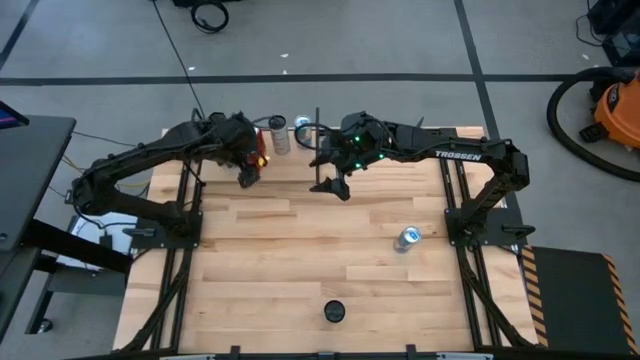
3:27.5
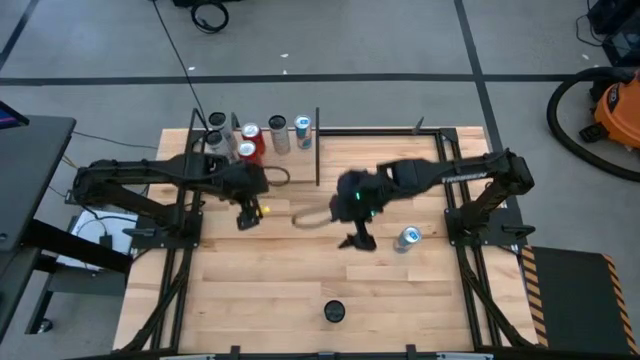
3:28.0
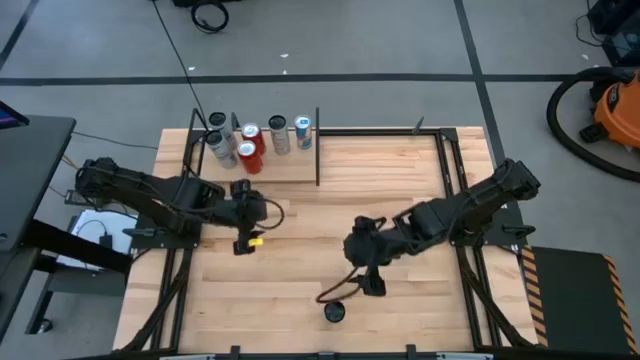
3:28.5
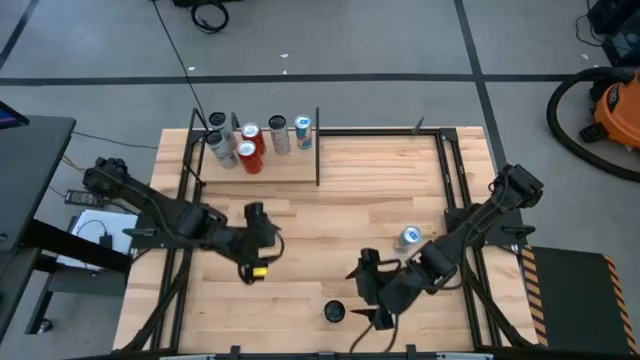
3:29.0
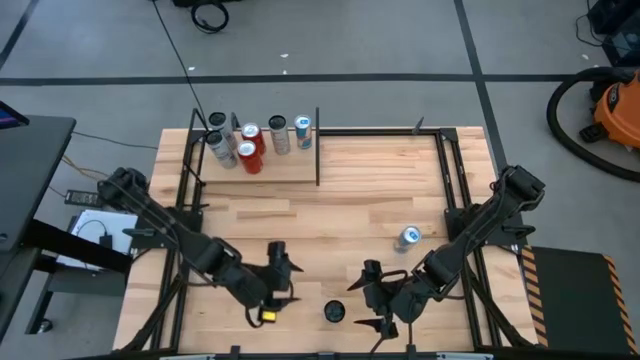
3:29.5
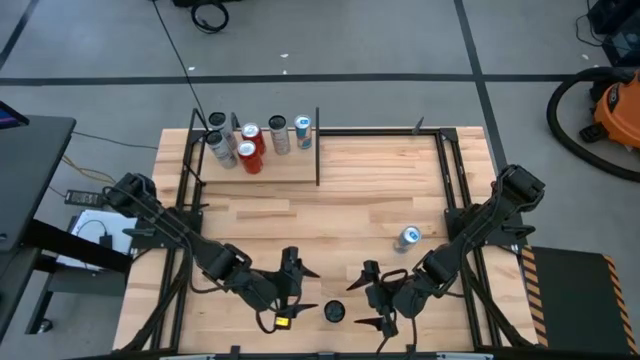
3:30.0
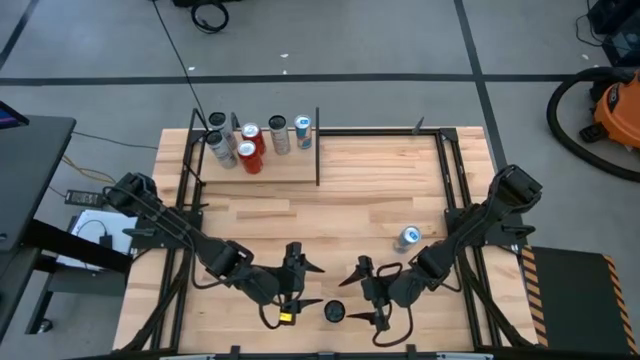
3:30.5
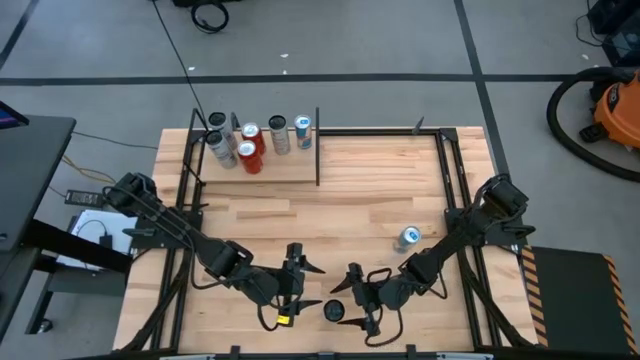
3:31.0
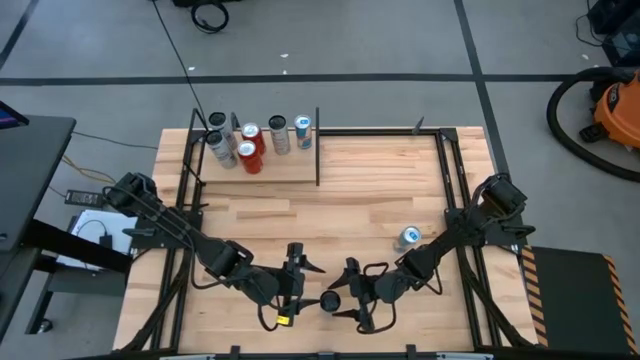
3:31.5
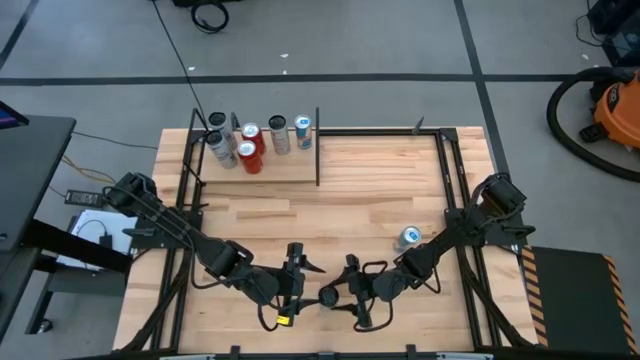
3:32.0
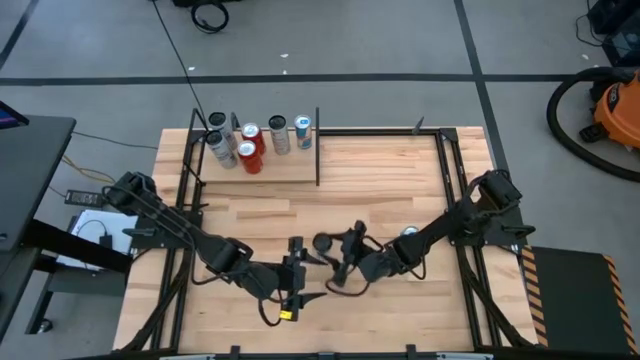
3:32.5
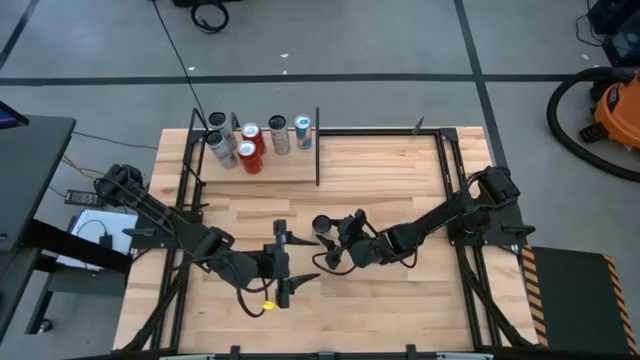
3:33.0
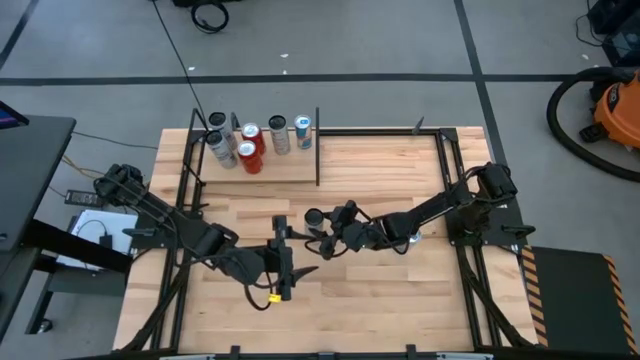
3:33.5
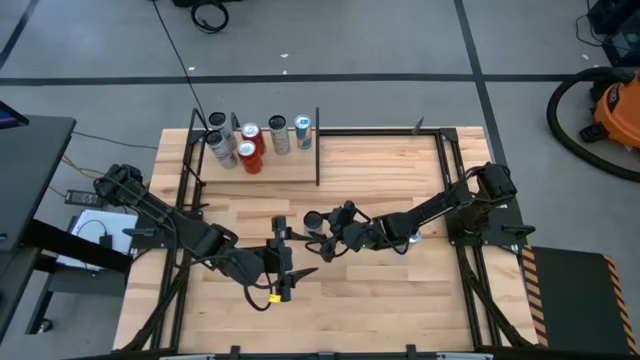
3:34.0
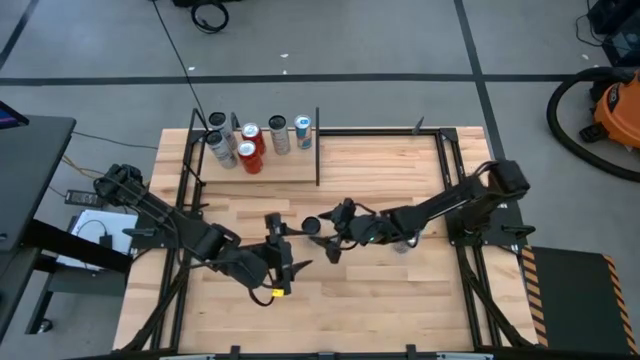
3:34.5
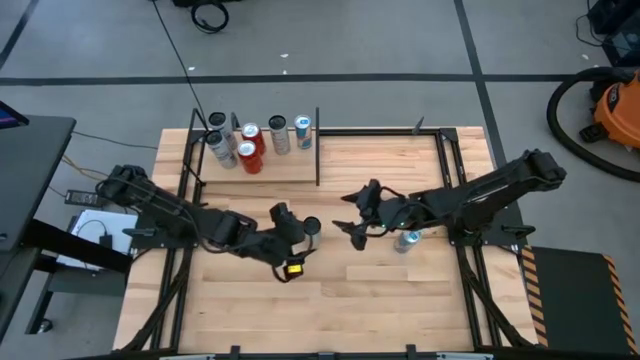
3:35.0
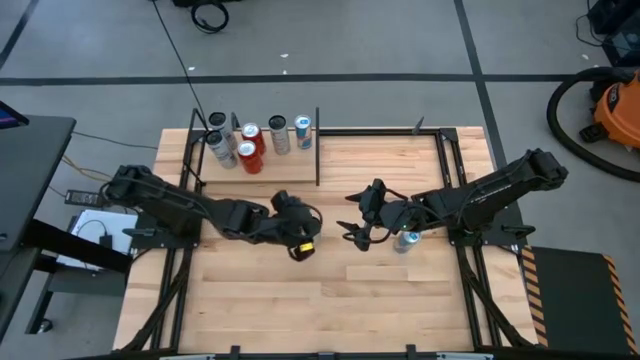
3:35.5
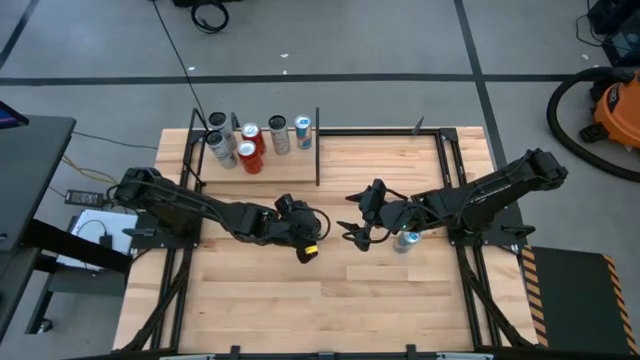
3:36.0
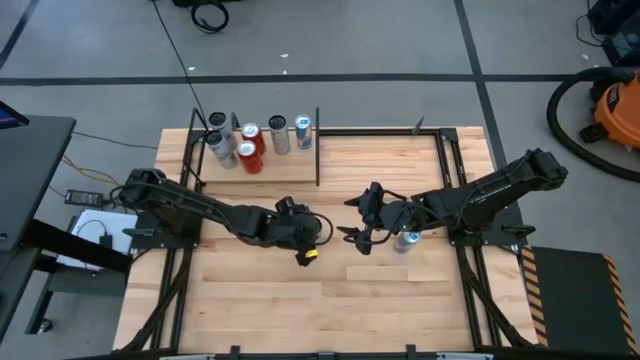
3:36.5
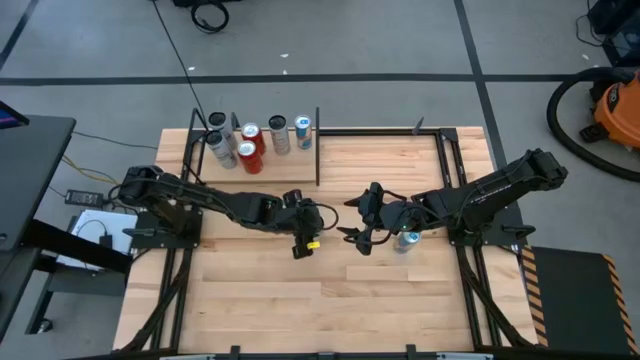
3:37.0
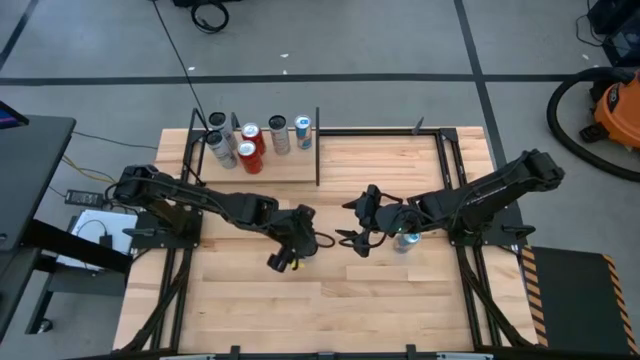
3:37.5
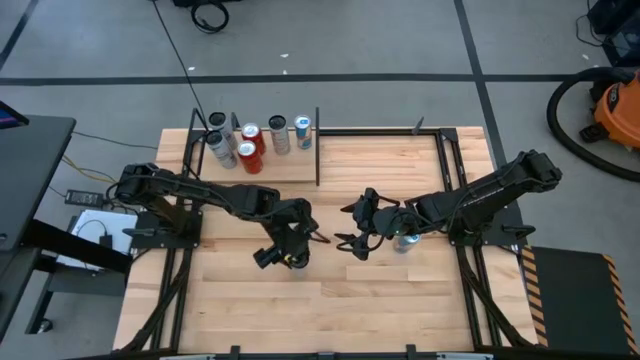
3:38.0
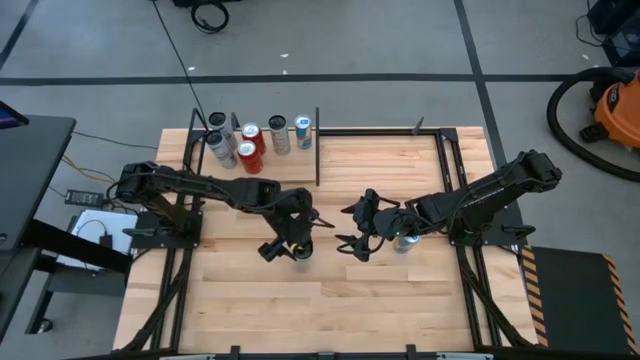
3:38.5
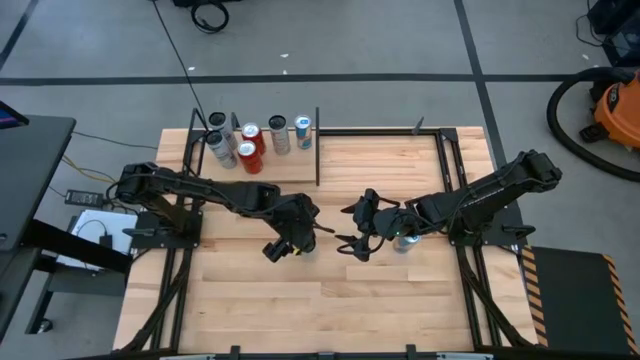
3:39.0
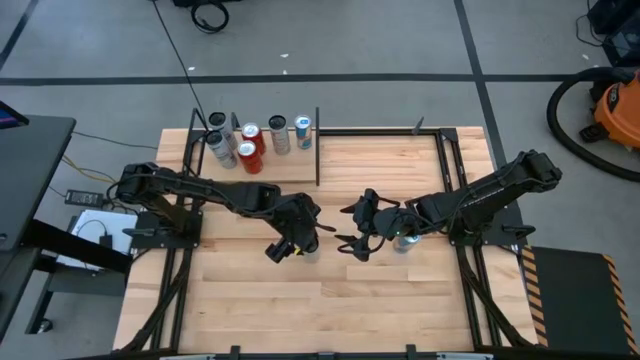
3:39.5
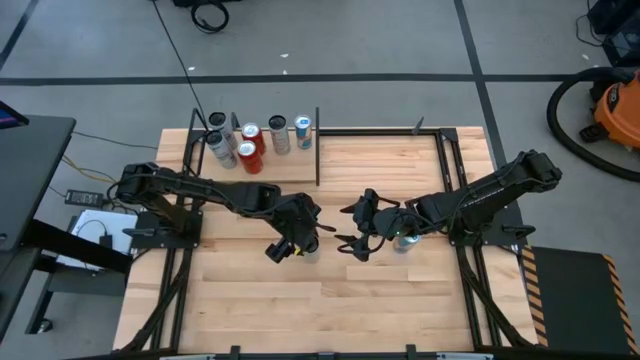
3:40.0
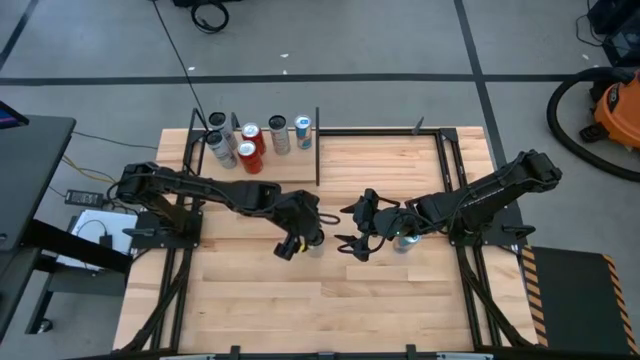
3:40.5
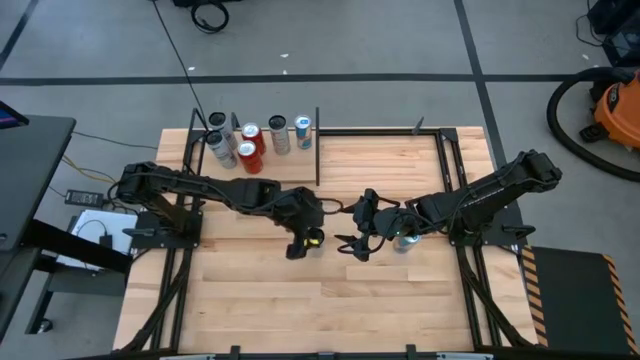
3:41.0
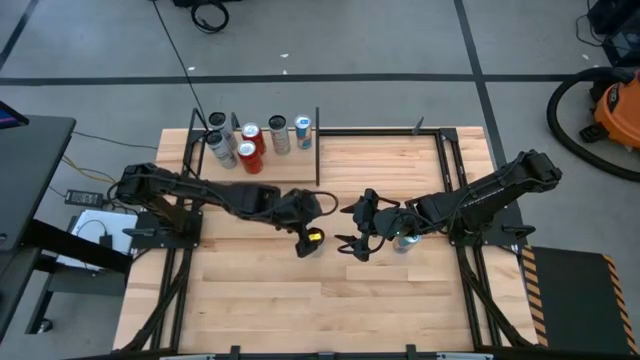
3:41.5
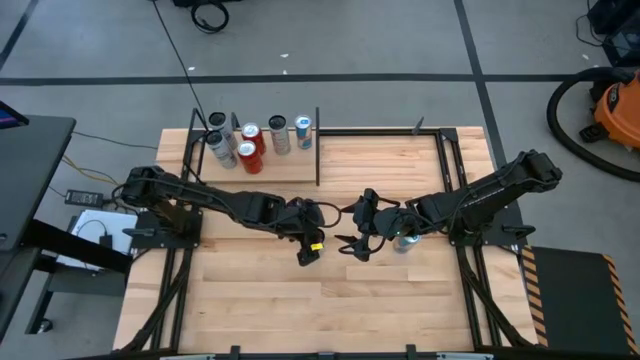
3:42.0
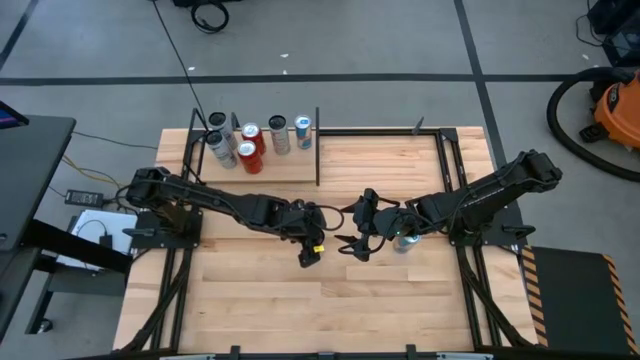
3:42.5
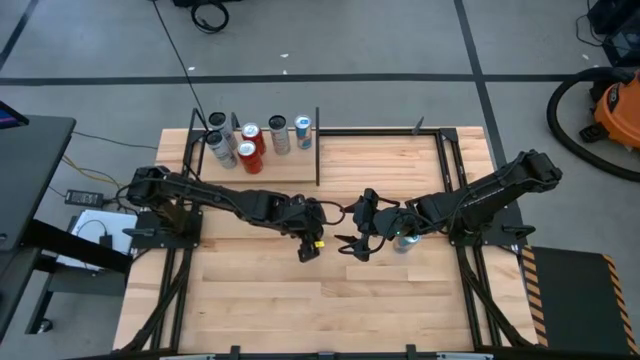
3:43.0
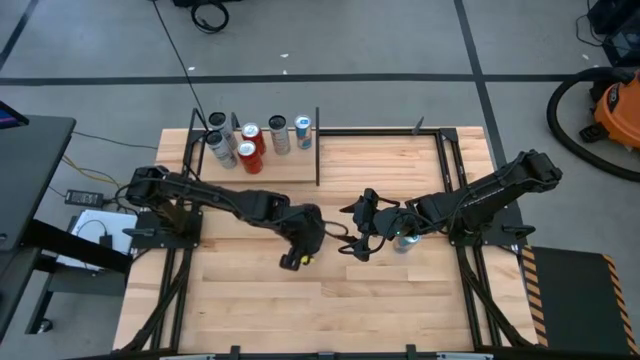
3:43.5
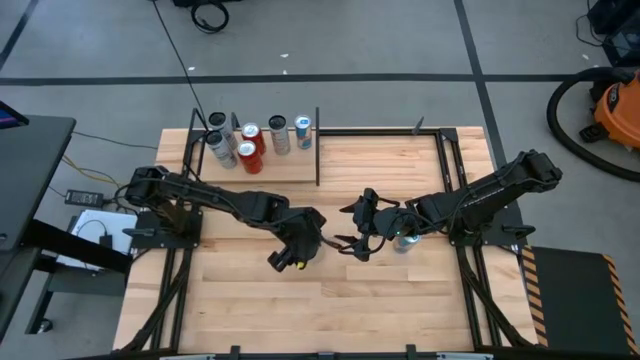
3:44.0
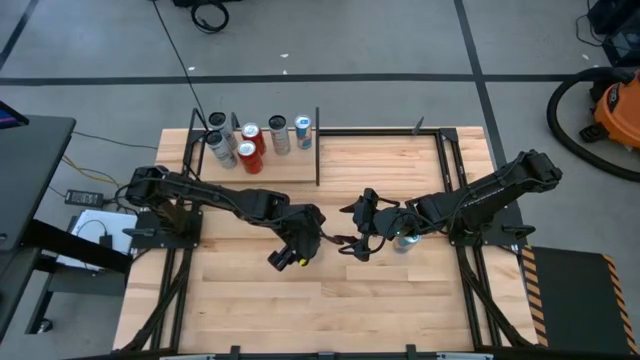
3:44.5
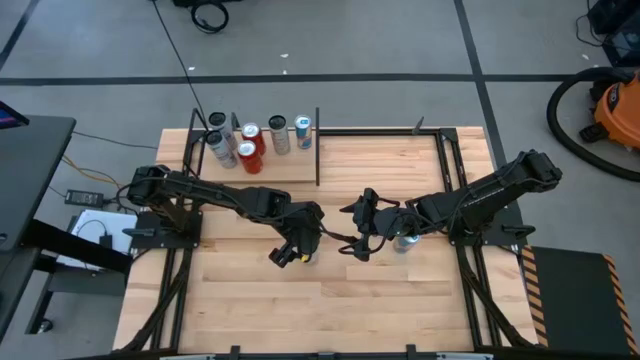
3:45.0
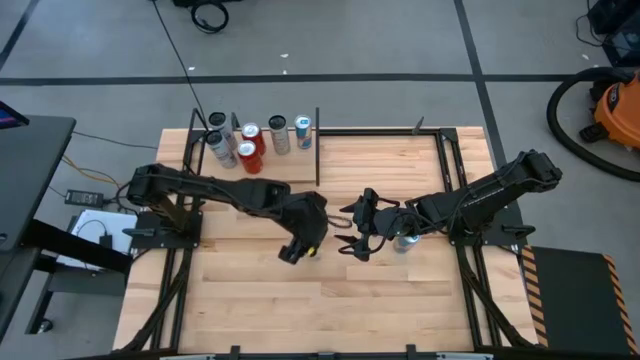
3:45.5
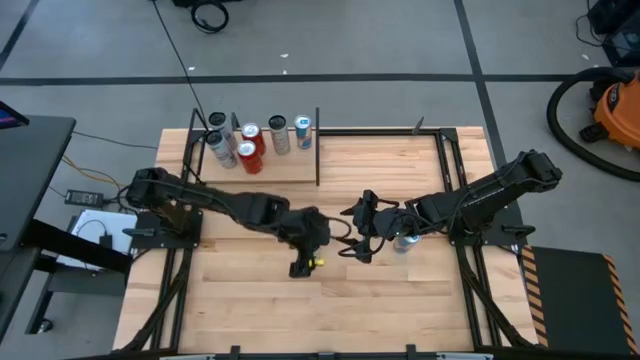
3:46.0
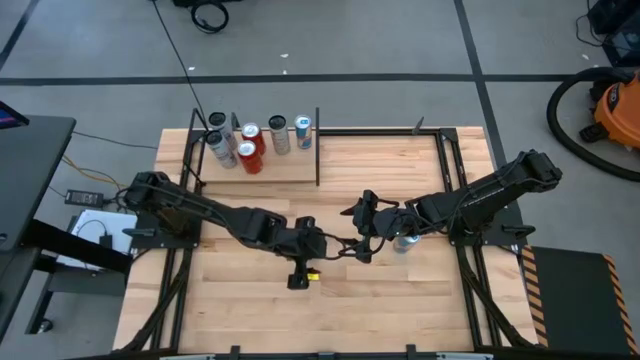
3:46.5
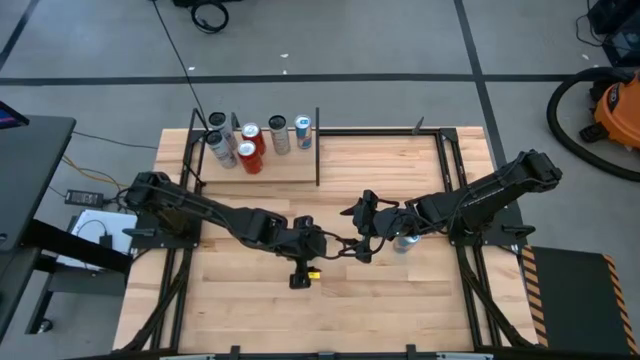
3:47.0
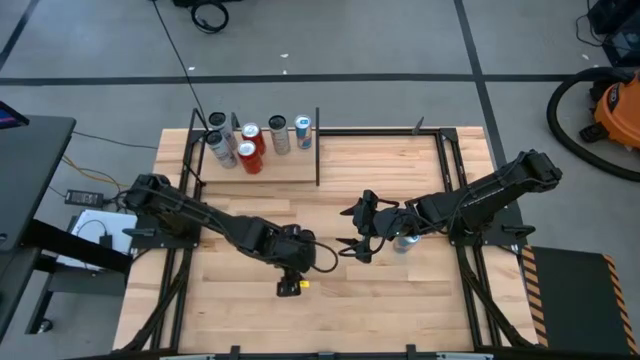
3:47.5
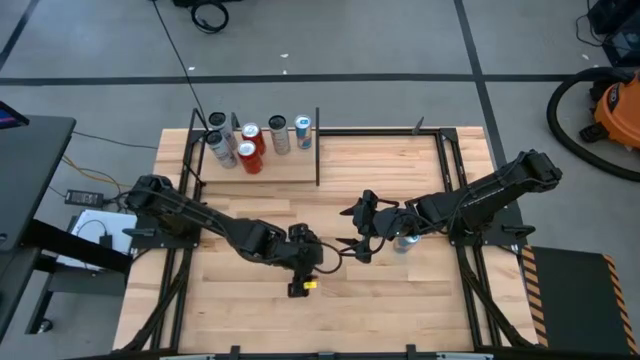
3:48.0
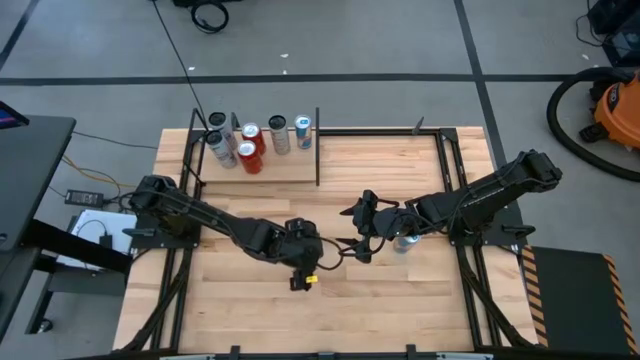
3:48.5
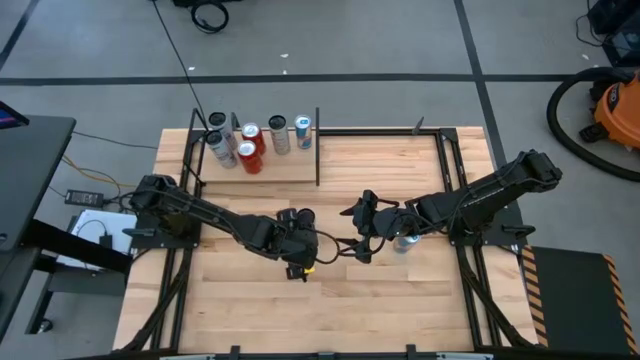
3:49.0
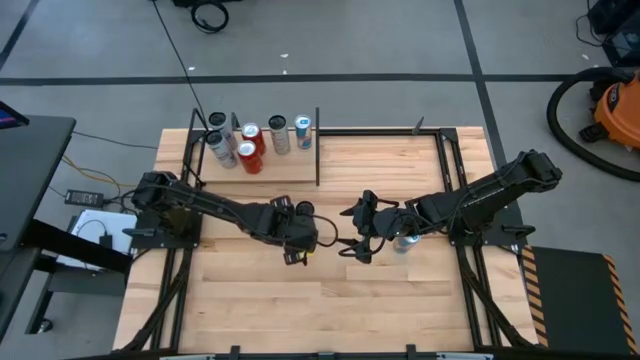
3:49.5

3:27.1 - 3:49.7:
Task: Place canned beverage on shelf
Put the white-yellow soda can on the shelf aligned with the other white-yellow soda can
